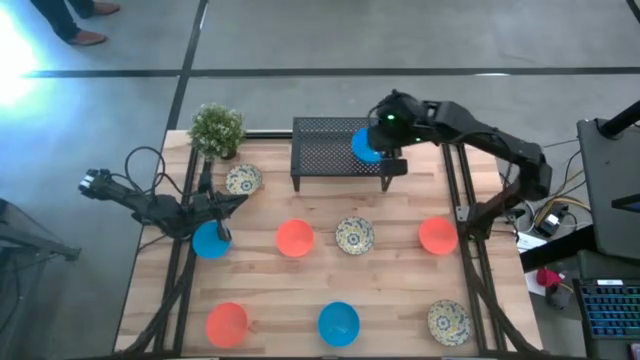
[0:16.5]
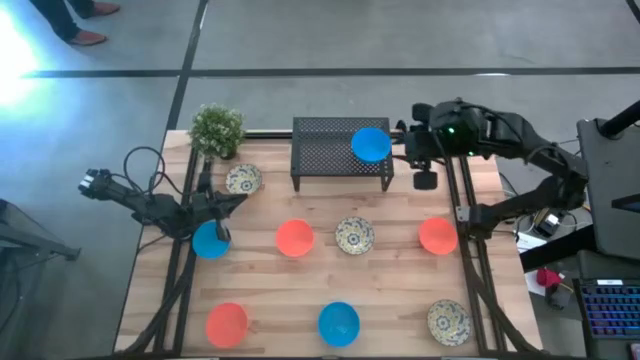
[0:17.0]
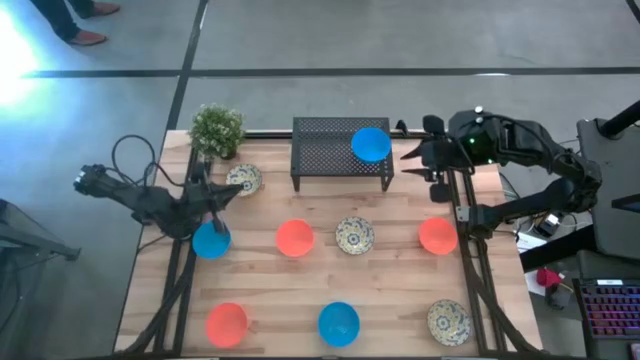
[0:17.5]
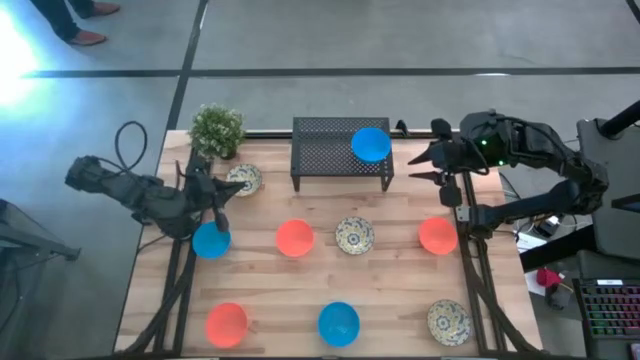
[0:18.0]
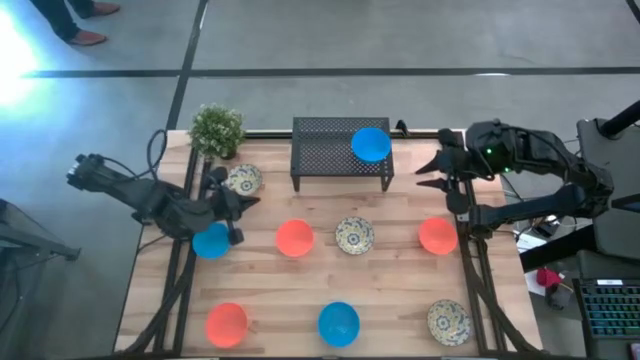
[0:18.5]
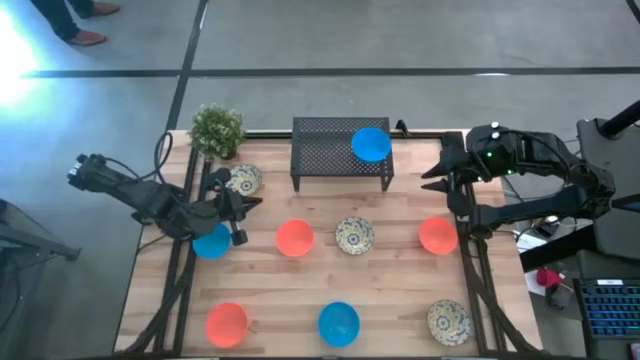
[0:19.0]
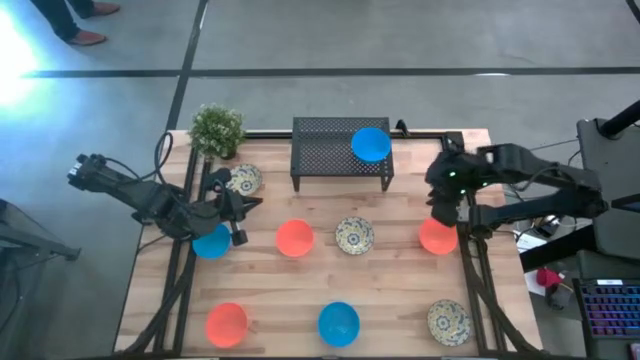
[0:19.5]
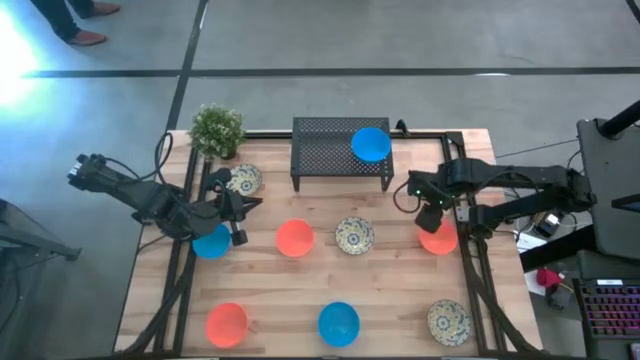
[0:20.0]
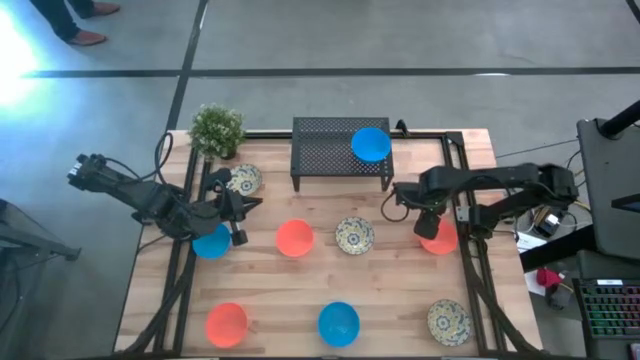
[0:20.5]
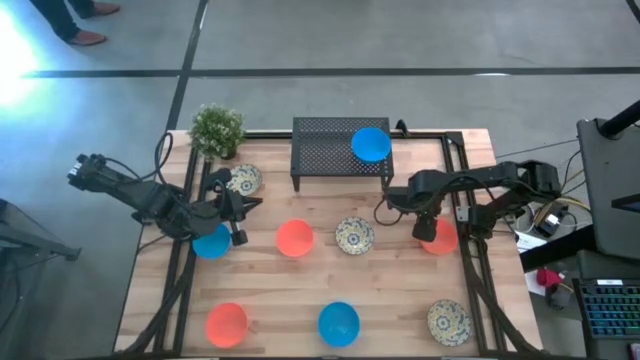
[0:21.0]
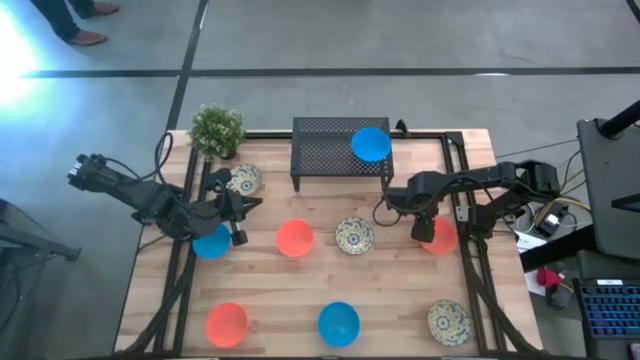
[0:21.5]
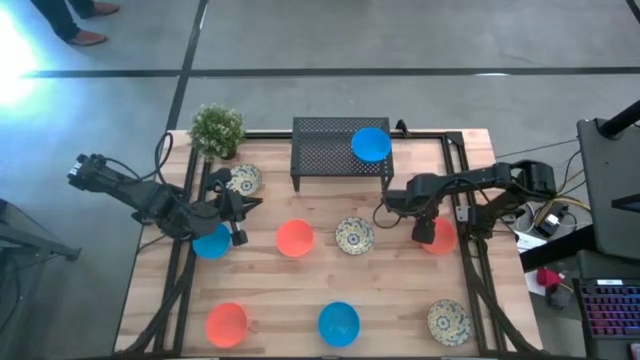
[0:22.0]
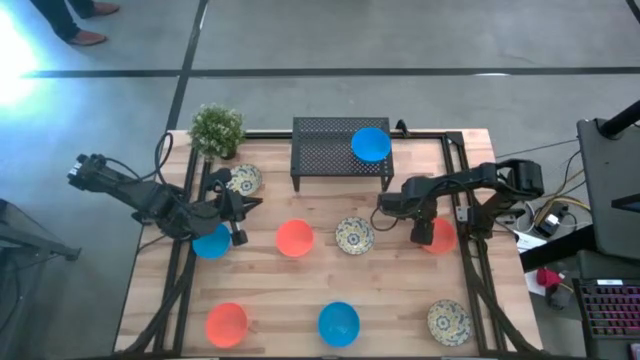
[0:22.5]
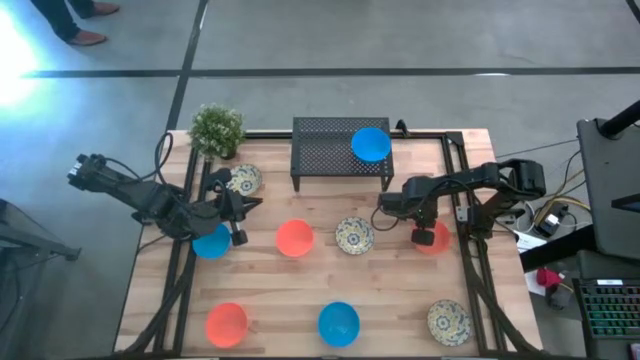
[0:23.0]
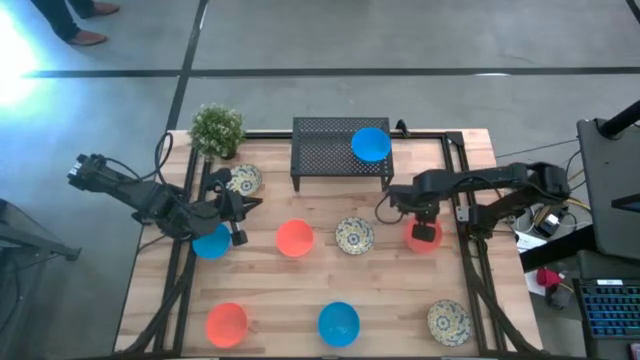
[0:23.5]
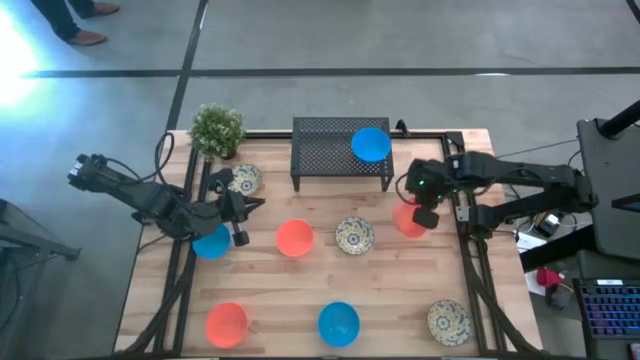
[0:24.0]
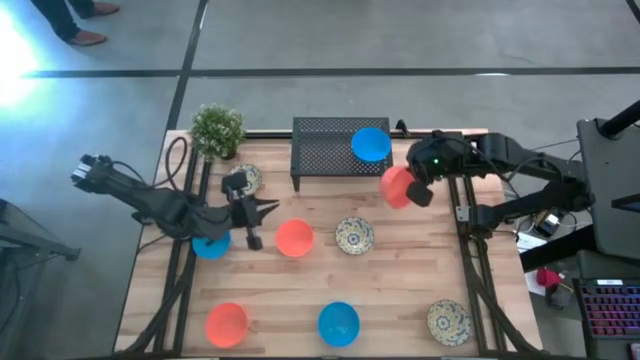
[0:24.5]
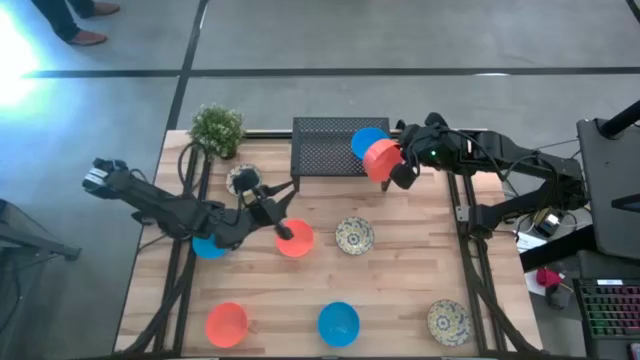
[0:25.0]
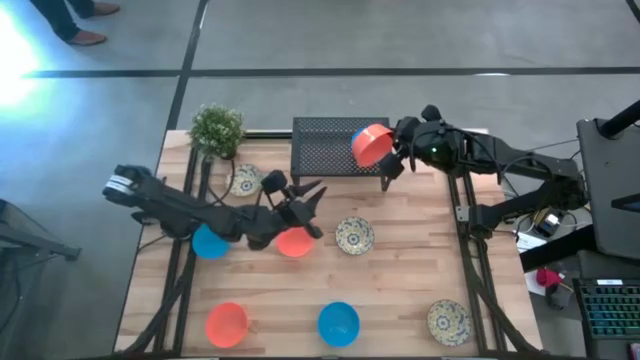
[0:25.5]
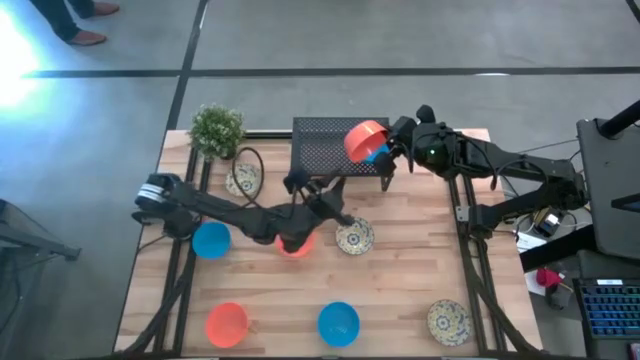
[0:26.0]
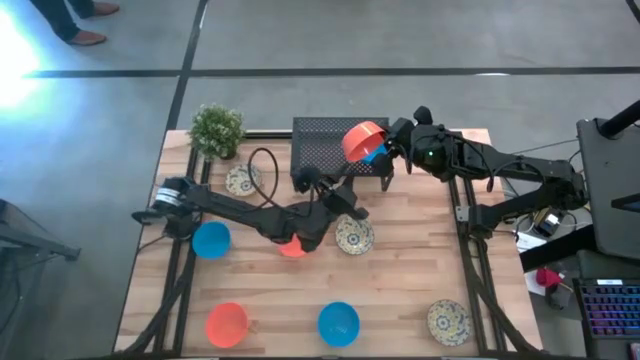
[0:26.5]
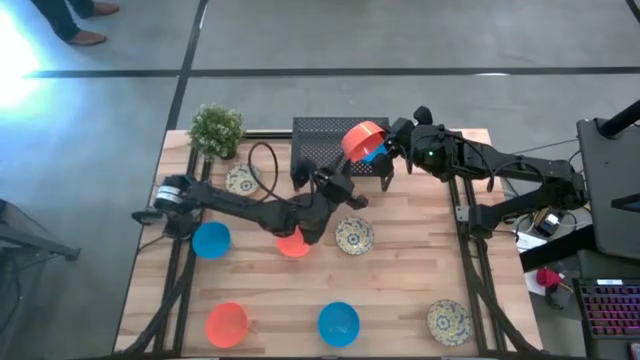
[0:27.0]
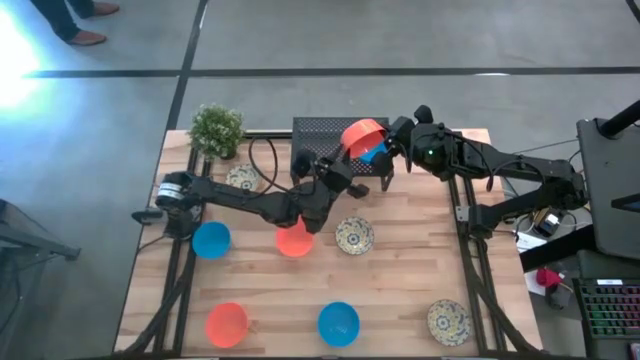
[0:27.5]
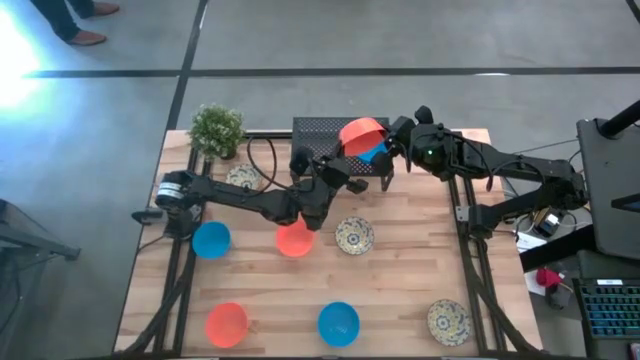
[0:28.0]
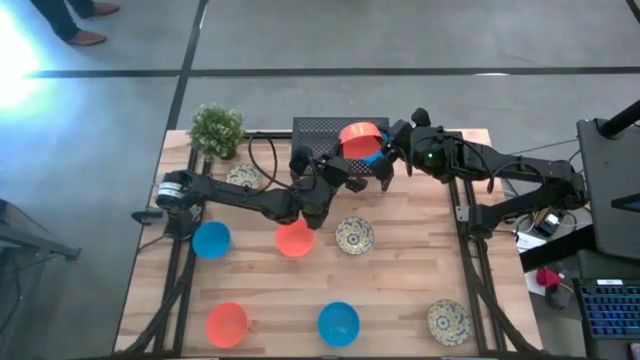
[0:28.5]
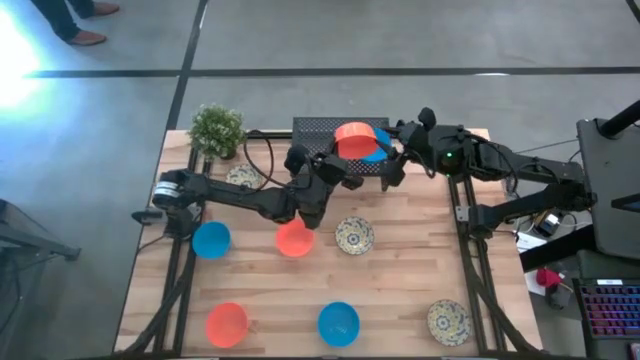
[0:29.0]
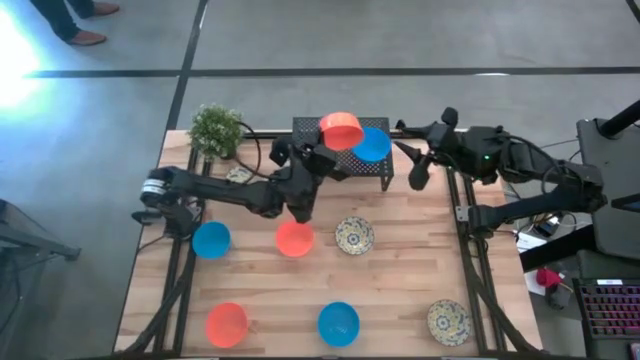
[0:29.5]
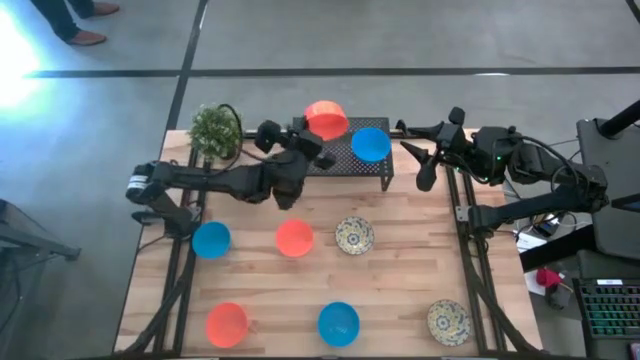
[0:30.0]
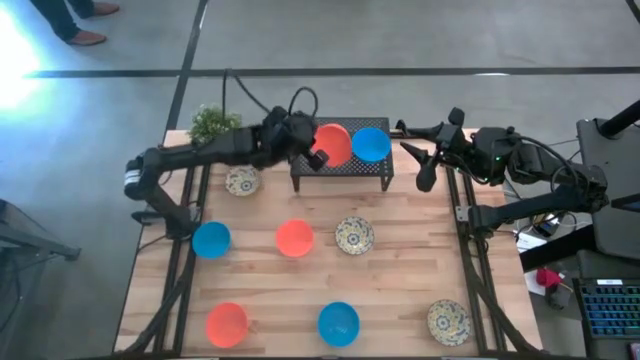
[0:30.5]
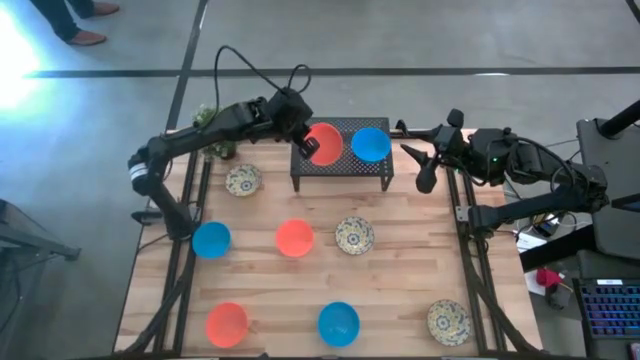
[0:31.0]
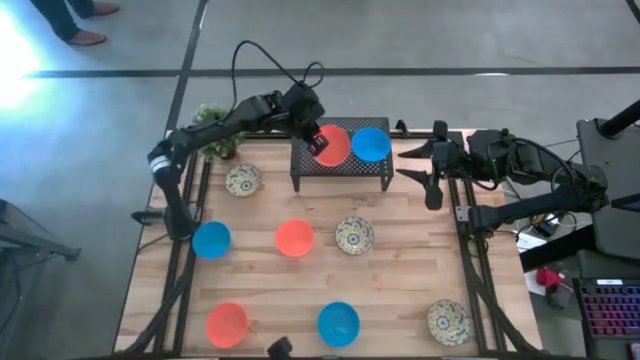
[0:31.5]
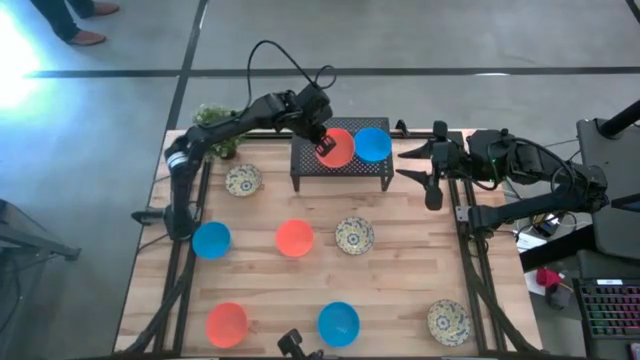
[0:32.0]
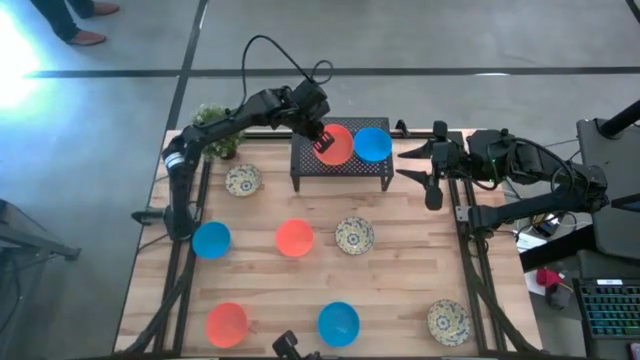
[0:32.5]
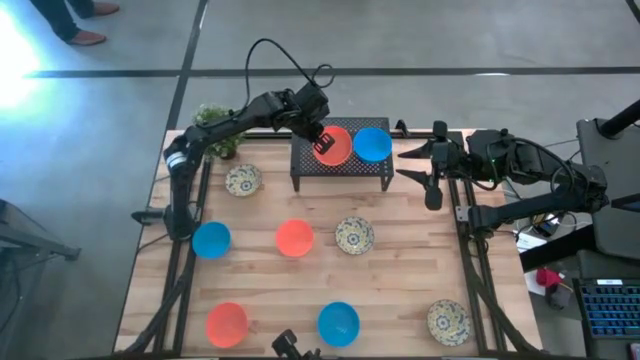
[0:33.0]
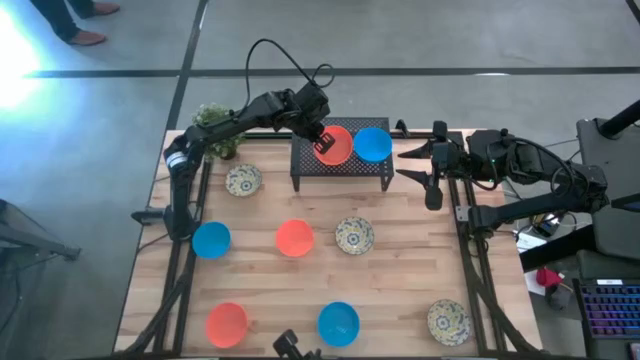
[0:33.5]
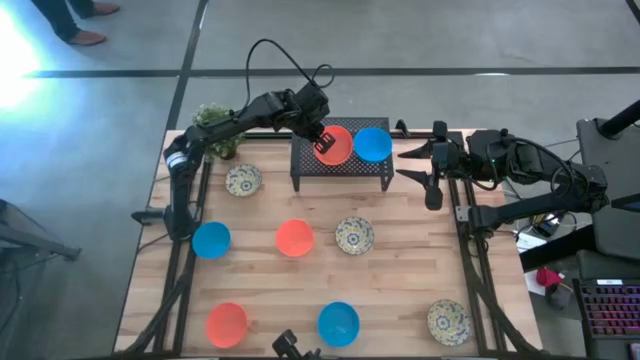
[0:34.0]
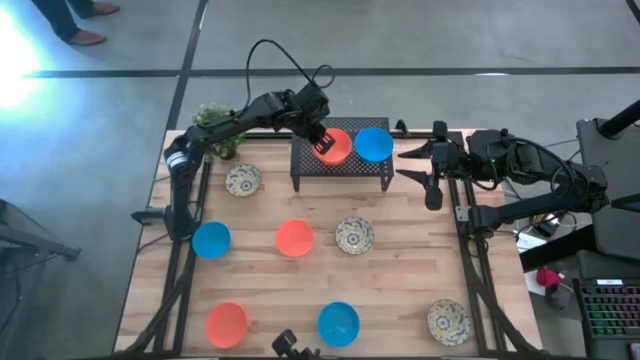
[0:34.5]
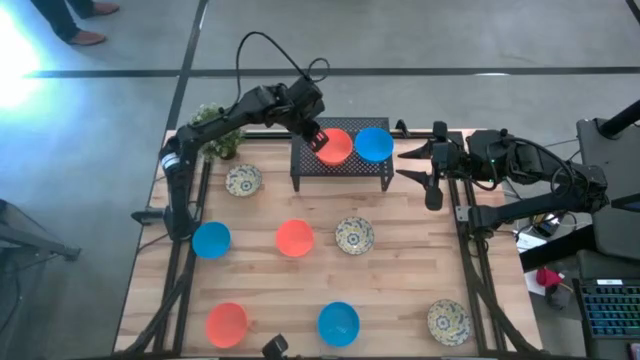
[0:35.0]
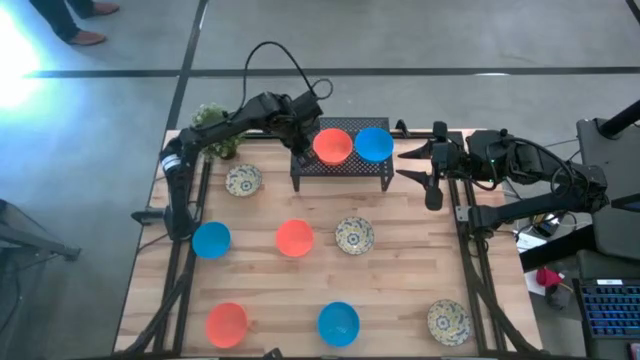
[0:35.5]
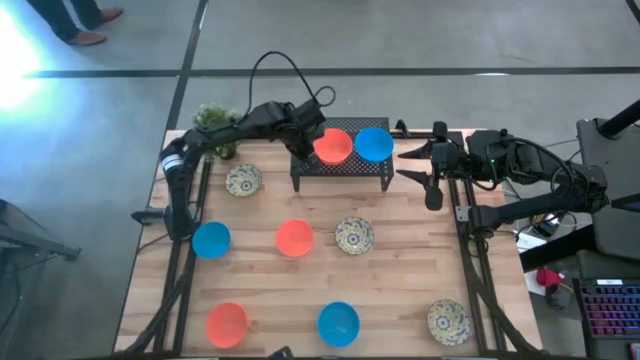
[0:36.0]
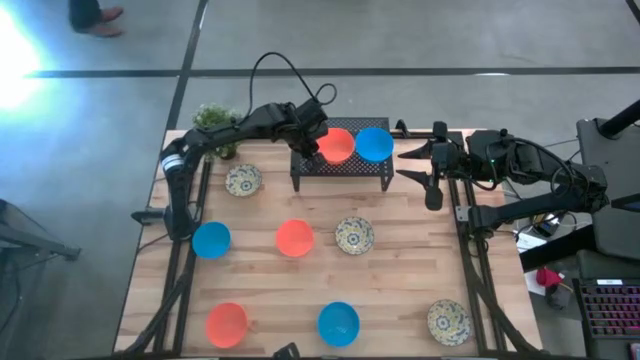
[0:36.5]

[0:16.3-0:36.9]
Task: Pick & Place Mini bowls
Put the top right orange bowl on the shelf
